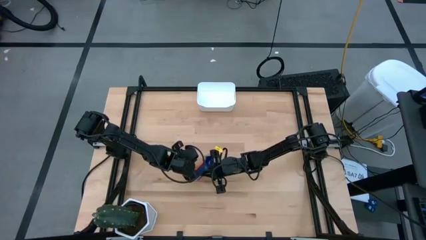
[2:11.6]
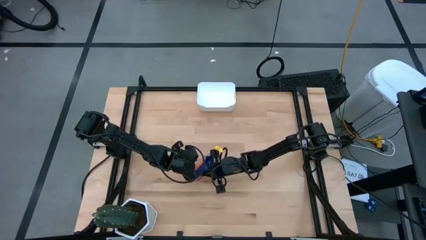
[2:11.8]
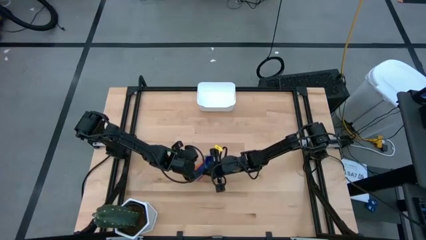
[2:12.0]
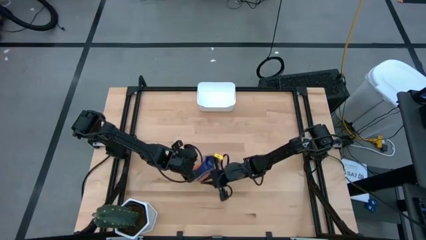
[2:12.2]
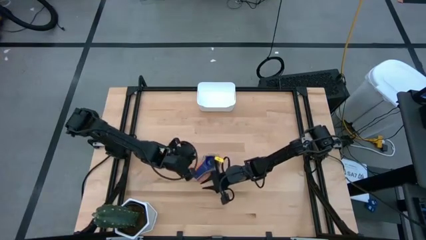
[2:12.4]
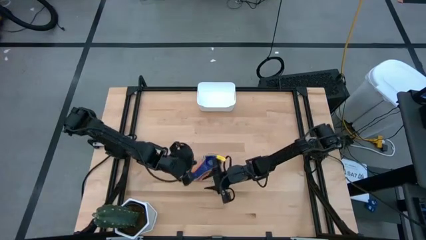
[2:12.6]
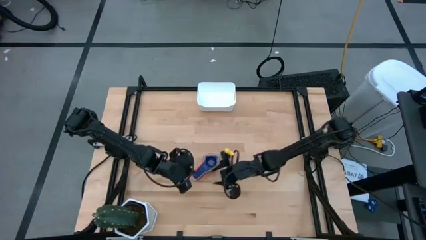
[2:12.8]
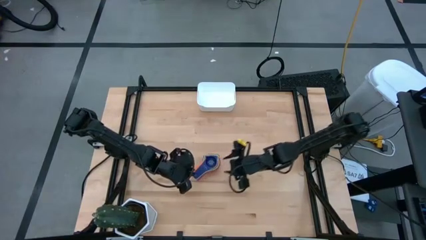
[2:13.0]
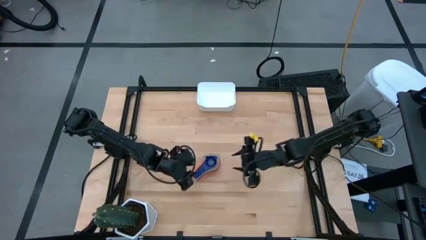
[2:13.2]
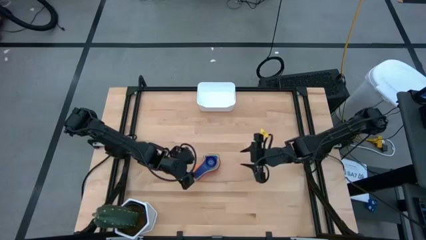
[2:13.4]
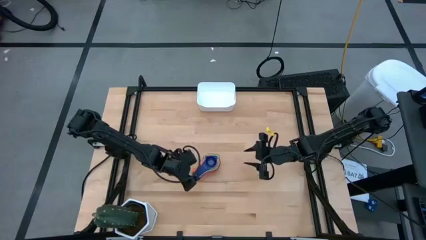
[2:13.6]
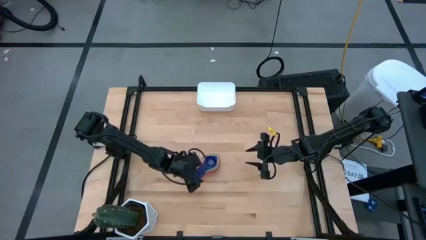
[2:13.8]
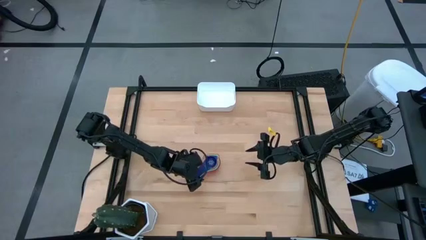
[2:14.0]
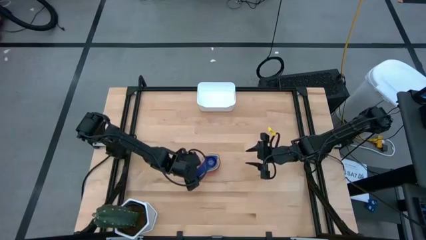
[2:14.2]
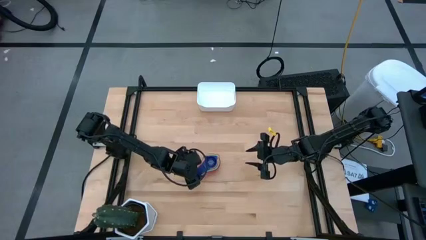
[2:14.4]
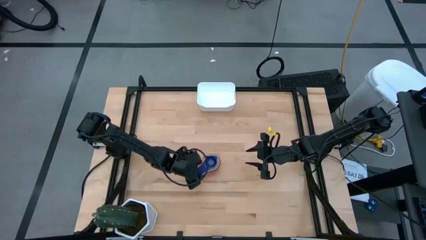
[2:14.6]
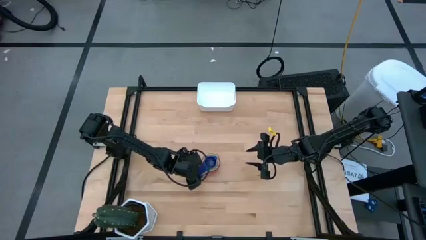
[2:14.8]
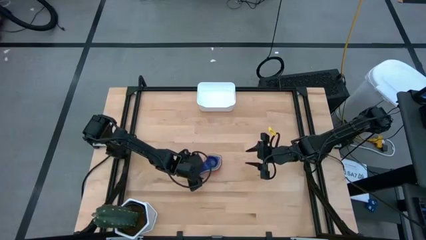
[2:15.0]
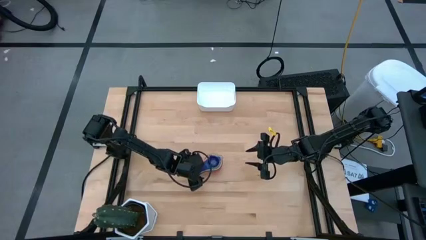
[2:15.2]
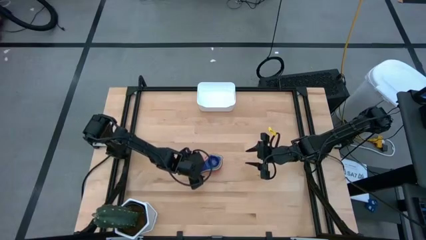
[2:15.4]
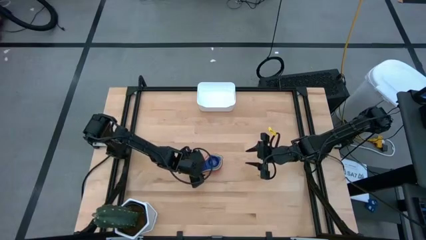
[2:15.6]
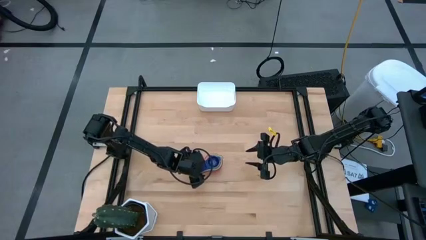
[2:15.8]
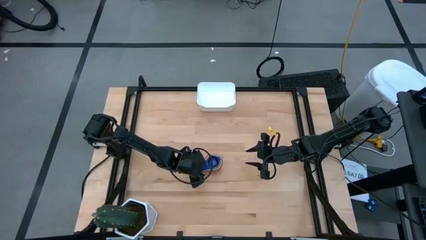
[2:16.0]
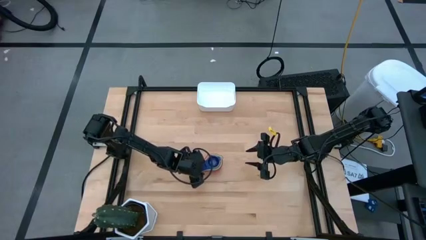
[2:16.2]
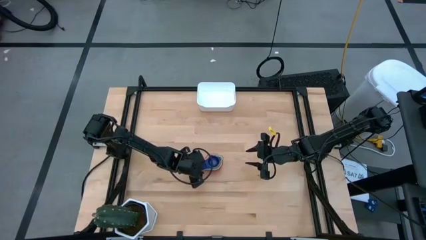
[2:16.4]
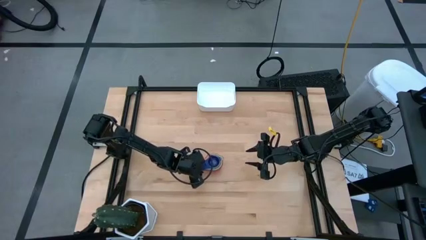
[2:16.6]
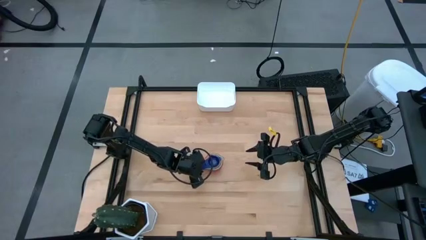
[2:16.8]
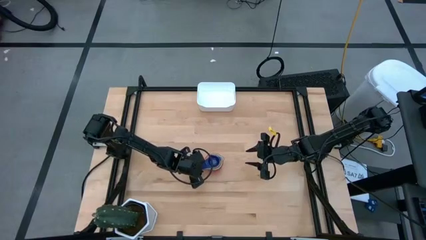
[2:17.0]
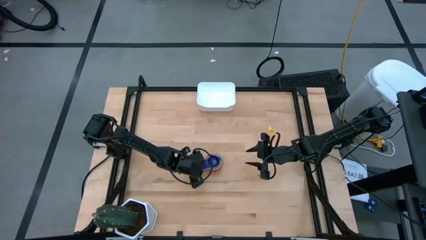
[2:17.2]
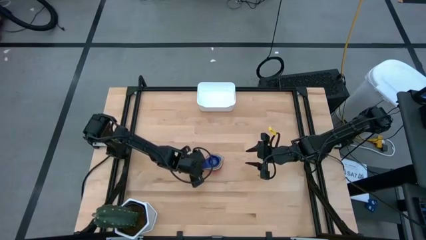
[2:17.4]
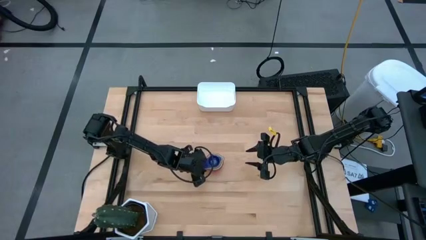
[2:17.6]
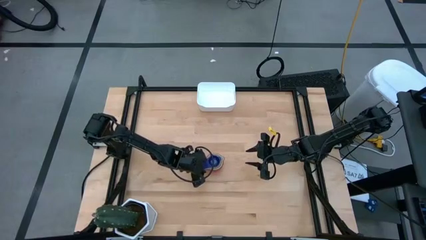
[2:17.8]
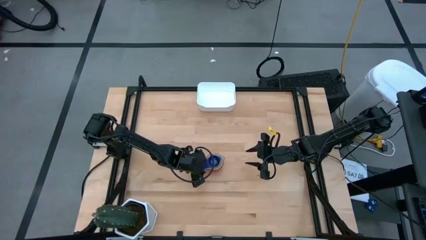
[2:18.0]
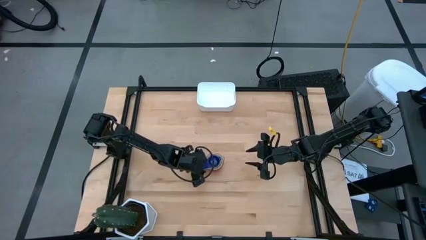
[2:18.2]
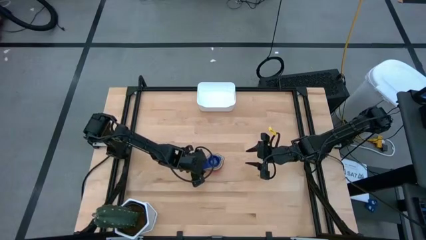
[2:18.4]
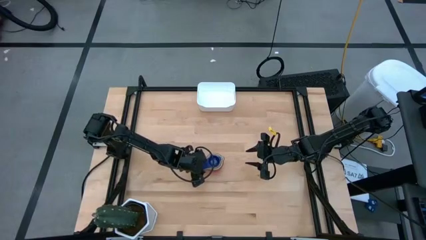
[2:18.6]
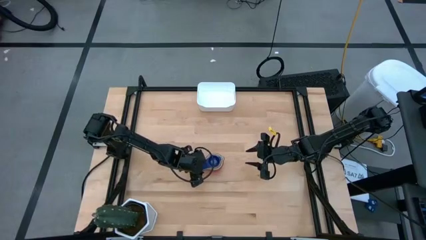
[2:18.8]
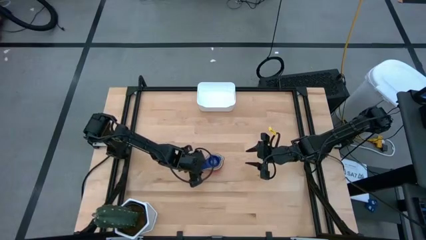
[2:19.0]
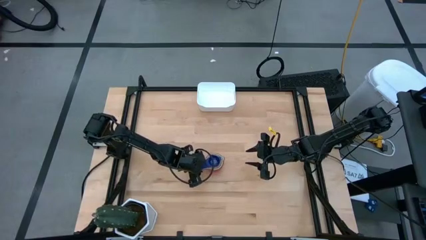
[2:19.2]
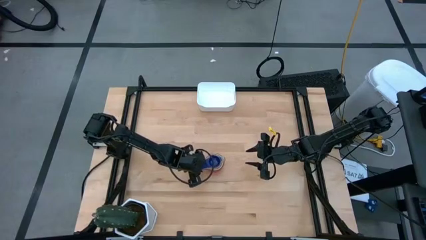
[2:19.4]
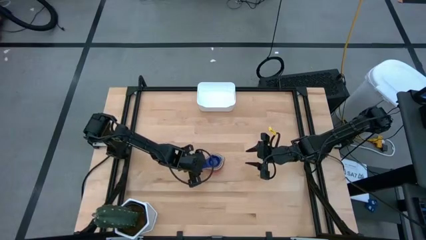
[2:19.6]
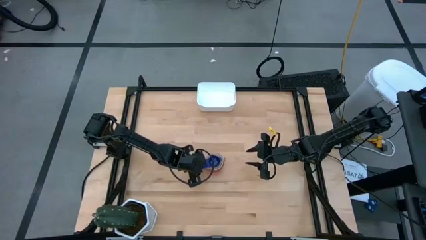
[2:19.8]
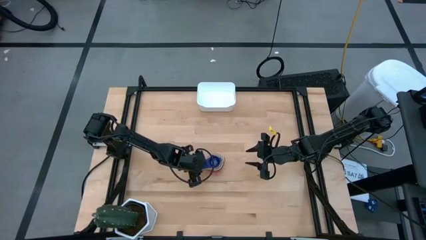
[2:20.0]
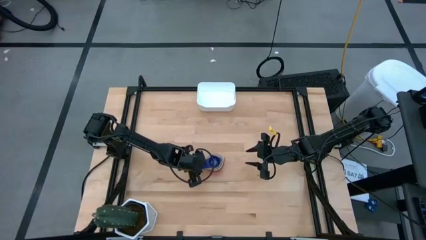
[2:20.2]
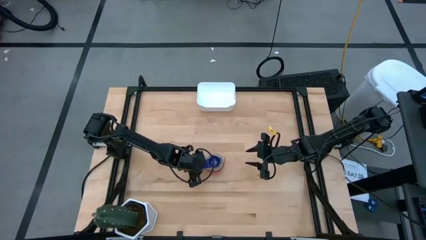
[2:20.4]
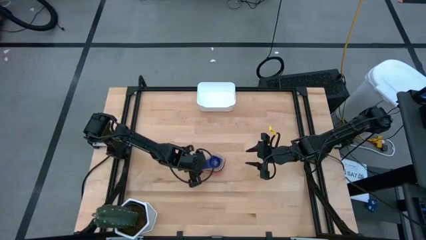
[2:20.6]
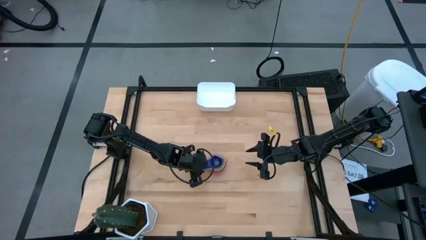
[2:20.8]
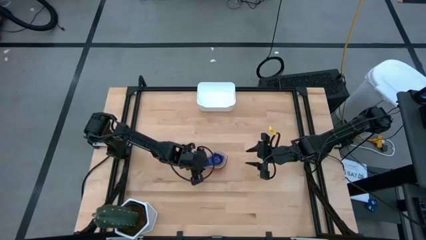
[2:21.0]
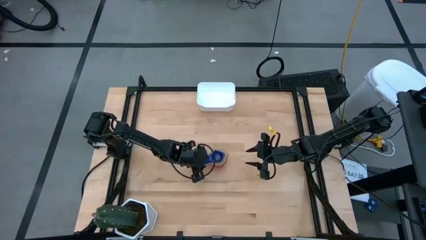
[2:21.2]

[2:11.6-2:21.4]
Task: Nest measuring cups in basket
Put the nested measuring cups into the white bin

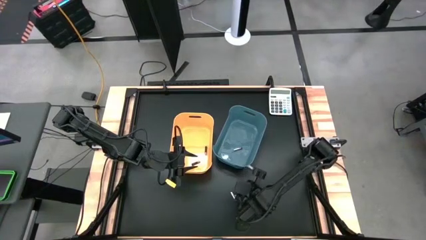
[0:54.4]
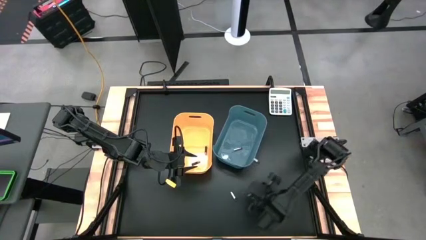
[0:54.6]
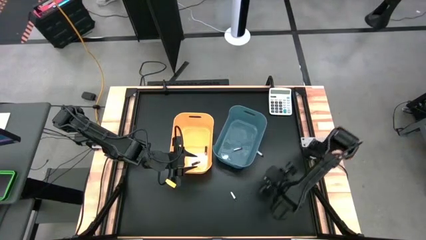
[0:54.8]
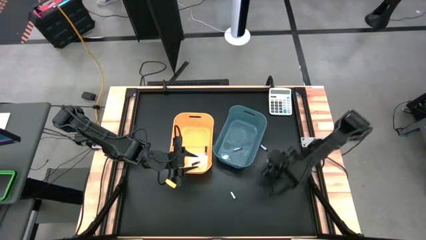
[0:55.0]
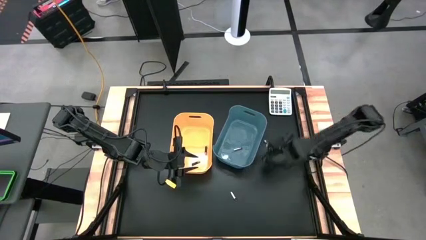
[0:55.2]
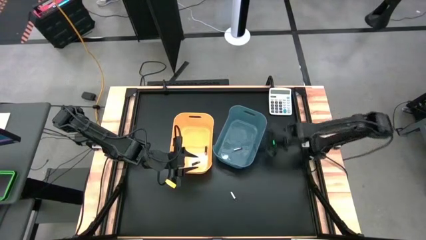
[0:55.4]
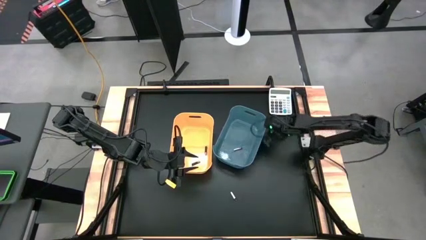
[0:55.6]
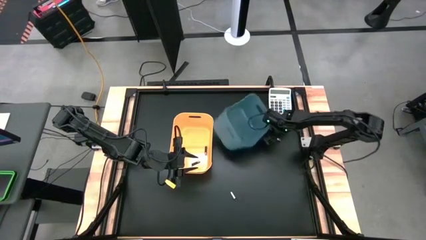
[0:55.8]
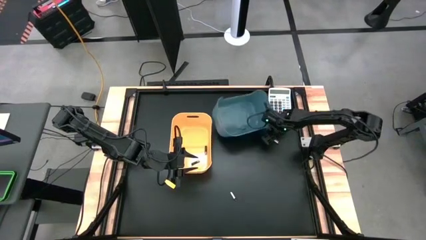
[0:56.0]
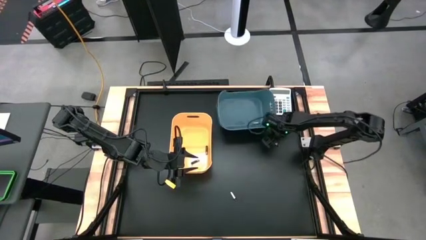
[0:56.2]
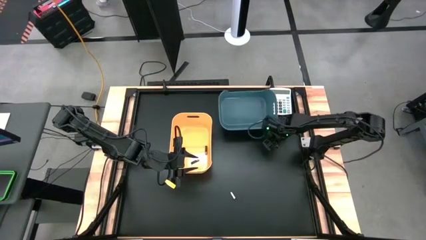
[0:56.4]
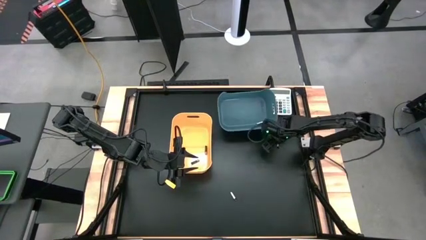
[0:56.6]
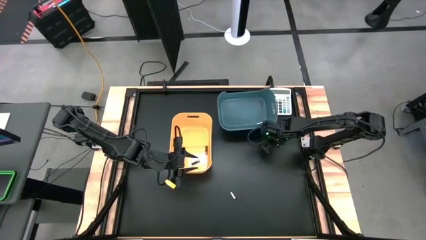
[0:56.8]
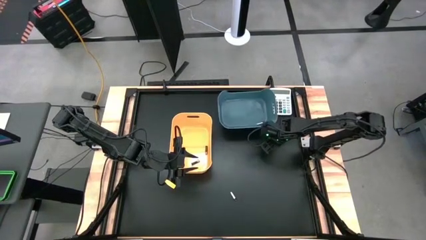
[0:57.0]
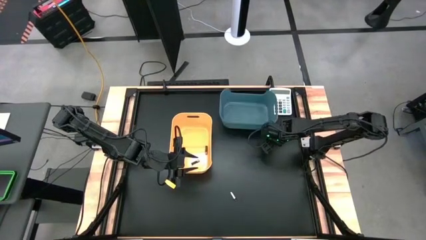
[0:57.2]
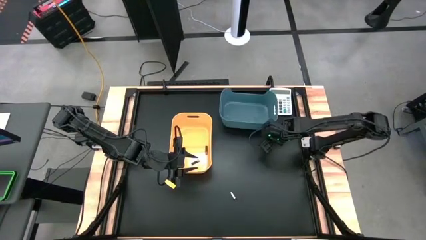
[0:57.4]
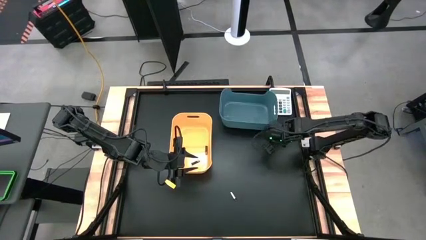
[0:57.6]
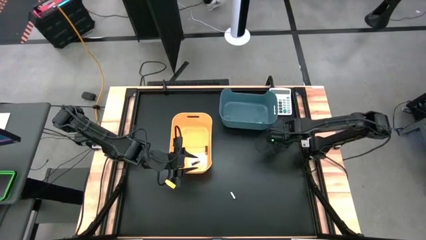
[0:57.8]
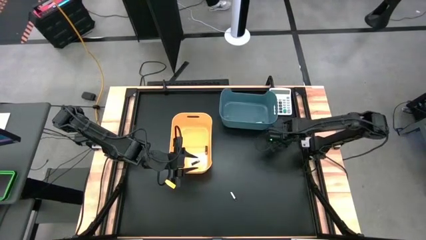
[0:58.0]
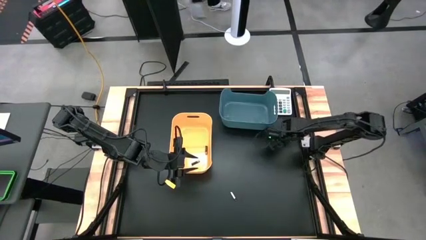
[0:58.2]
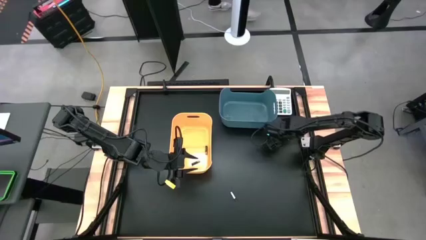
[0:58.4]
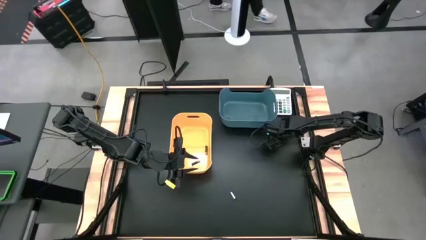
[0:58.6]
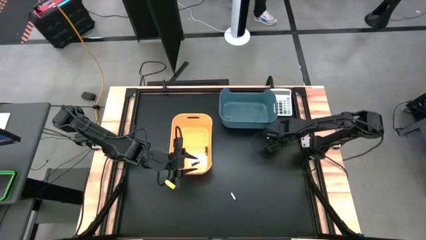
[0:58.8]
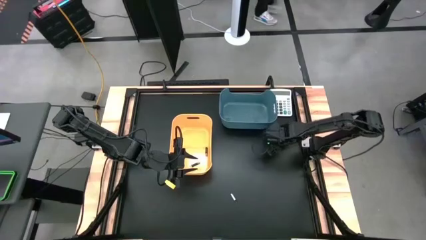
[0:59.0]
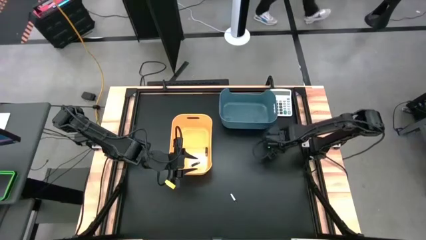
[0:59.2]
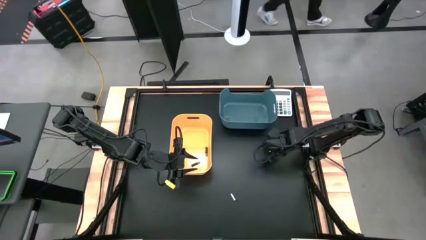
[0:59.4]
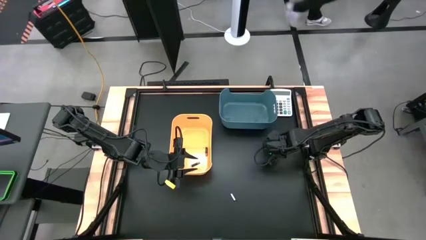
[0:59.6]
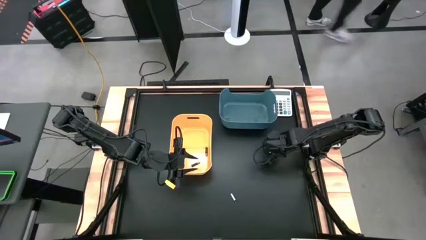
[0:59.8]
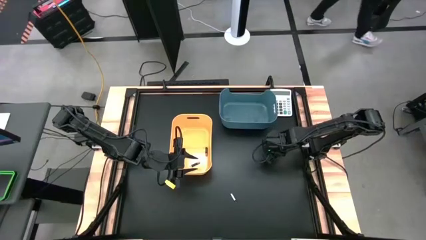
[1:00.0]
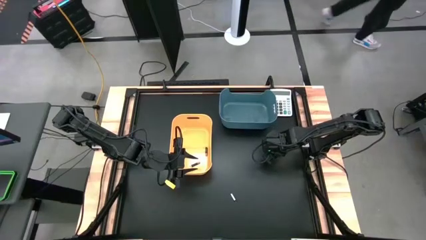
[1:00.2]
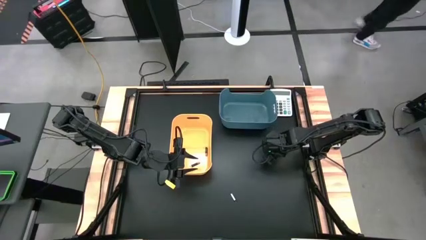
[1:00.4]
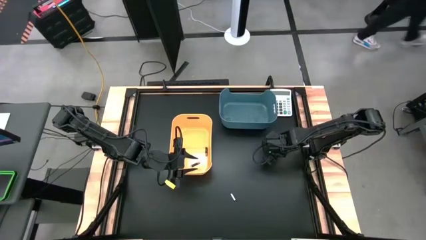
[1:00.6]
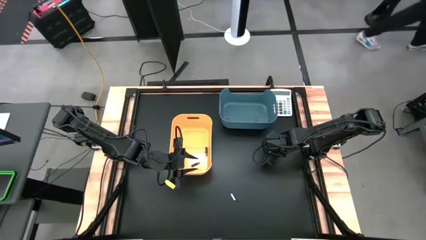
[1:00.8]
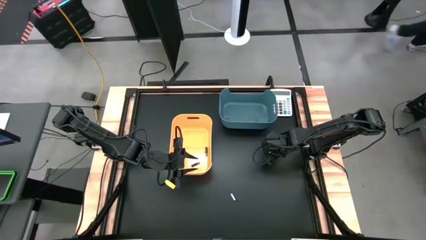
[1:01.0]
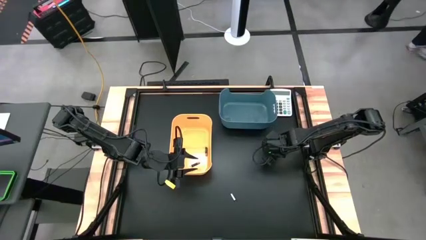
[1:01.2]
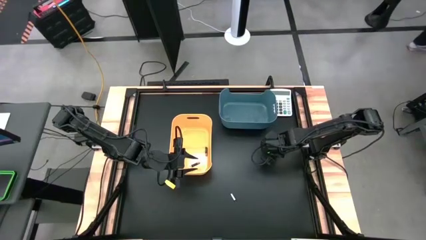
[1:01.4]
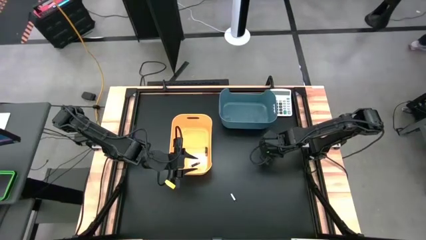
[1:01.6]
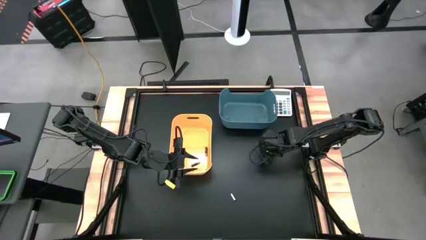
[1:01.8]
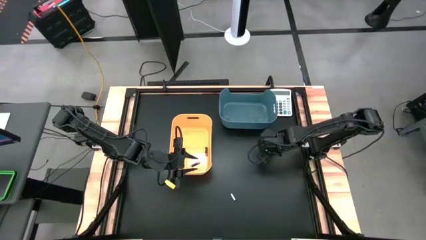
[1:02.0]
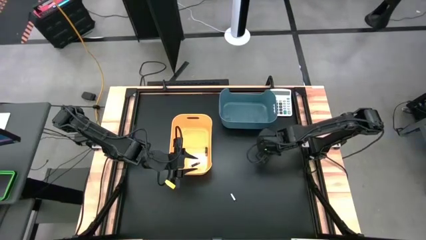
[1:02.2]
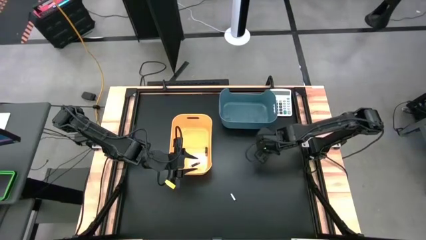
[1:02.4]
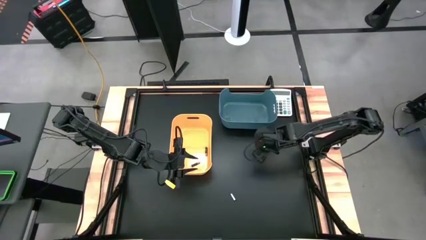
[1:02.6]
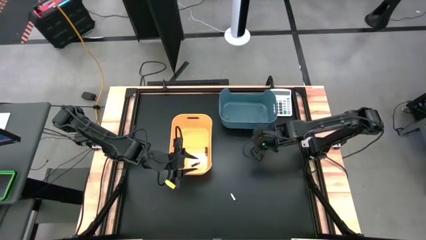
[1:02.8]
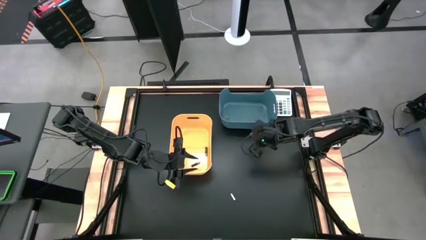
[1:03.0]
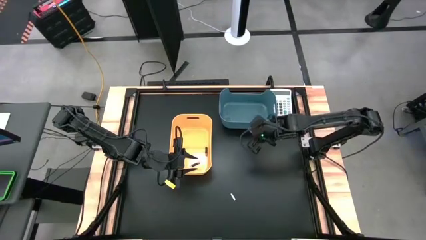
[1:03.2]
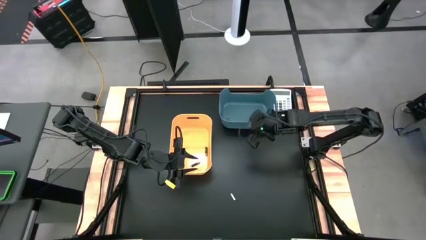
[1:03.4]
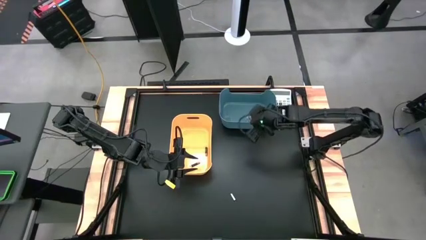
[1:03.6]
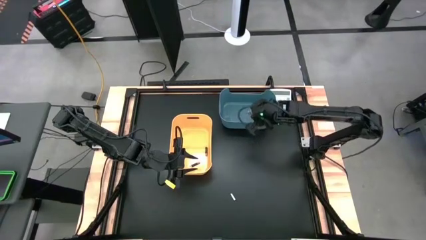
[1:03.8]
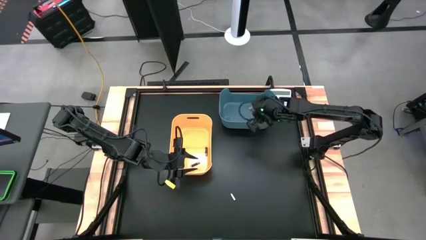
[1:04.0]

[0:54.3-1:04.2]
Task: Sort batteries
Put the top silver battery in the blue bin
